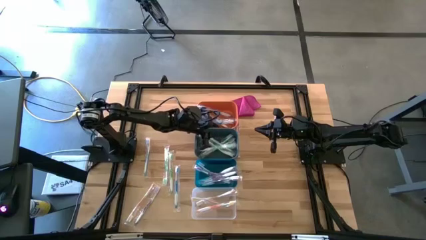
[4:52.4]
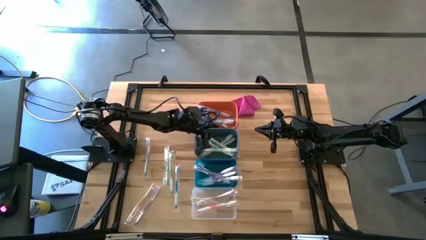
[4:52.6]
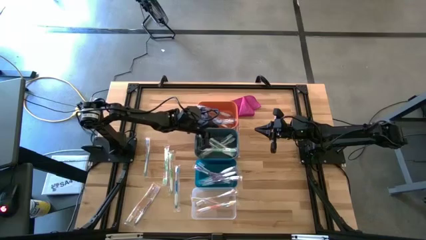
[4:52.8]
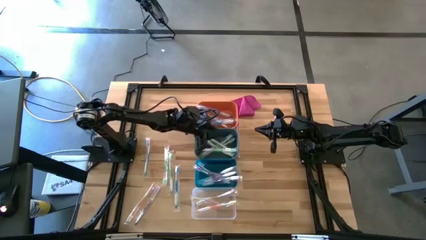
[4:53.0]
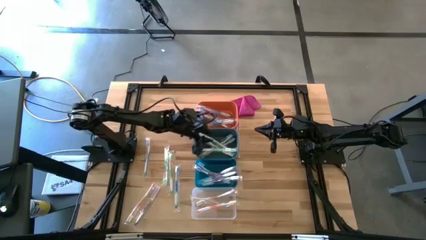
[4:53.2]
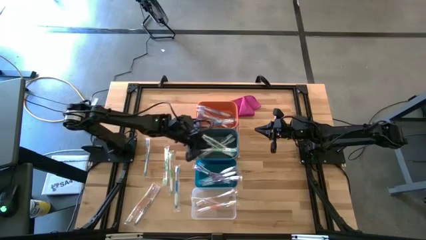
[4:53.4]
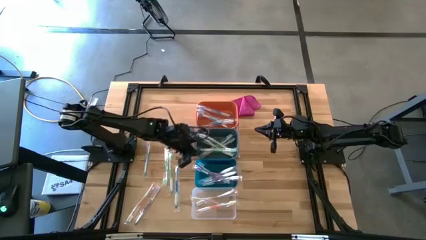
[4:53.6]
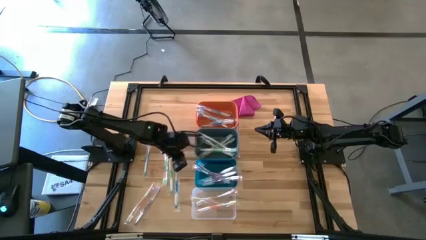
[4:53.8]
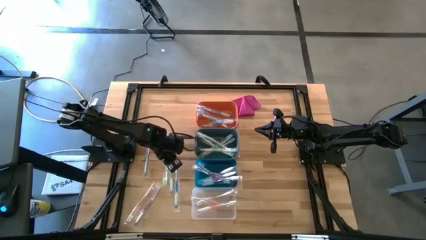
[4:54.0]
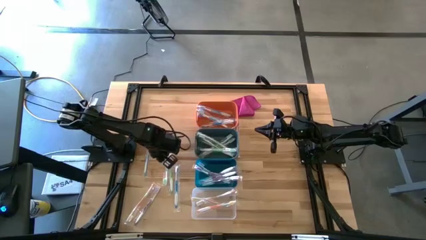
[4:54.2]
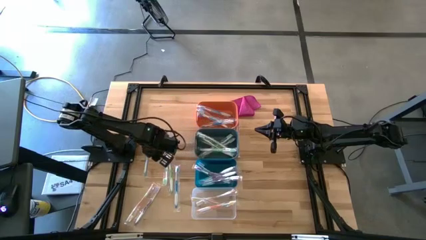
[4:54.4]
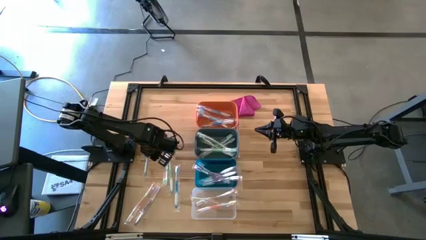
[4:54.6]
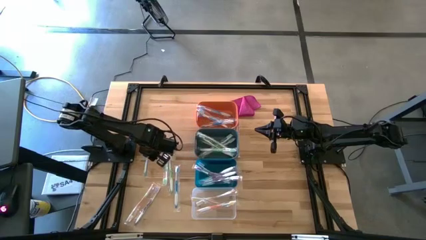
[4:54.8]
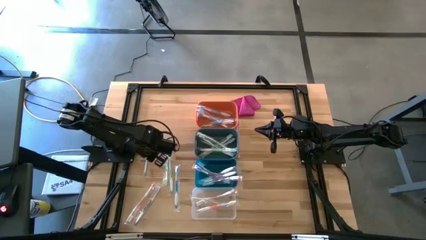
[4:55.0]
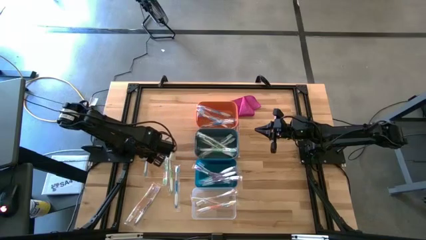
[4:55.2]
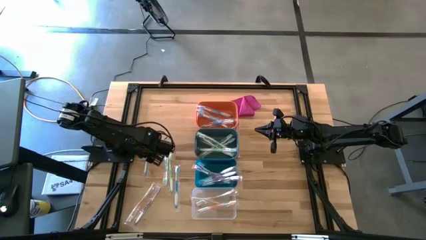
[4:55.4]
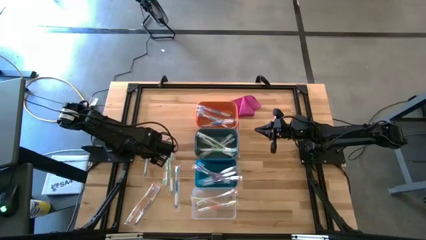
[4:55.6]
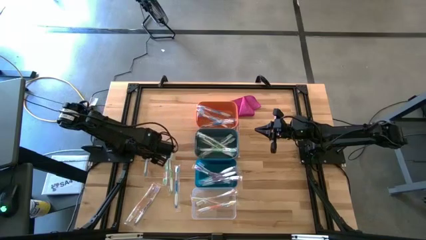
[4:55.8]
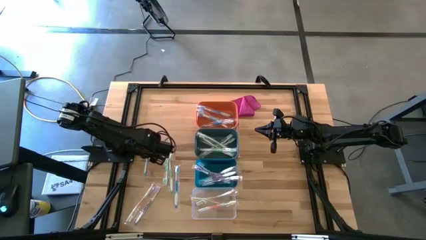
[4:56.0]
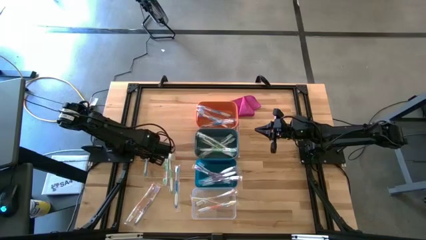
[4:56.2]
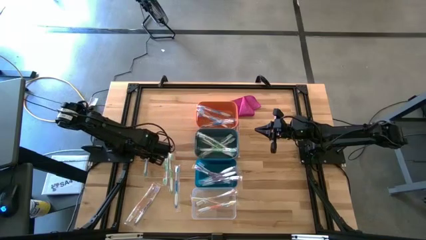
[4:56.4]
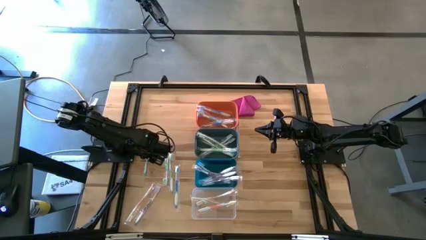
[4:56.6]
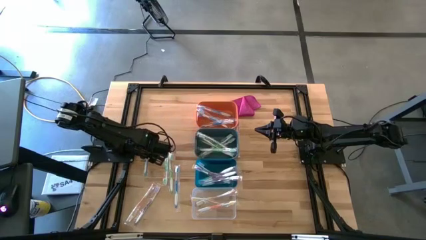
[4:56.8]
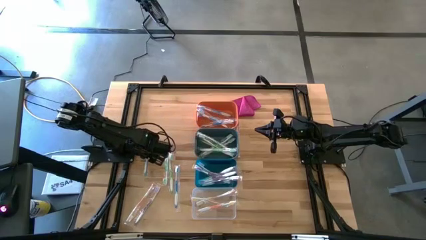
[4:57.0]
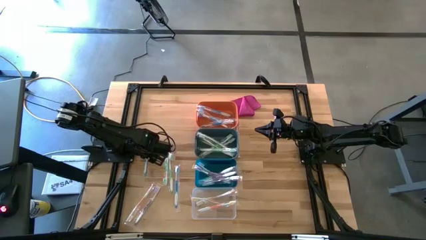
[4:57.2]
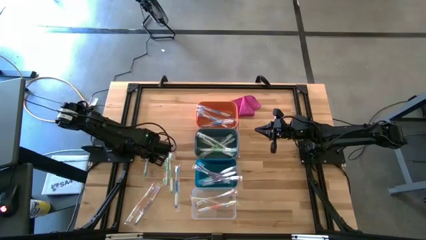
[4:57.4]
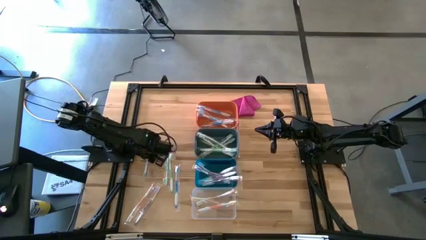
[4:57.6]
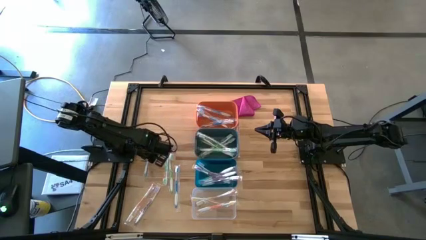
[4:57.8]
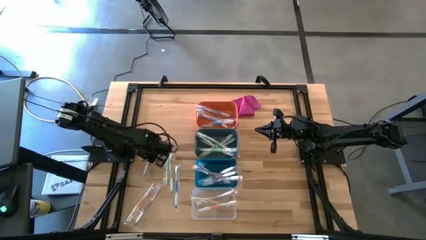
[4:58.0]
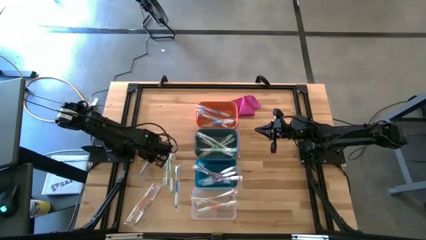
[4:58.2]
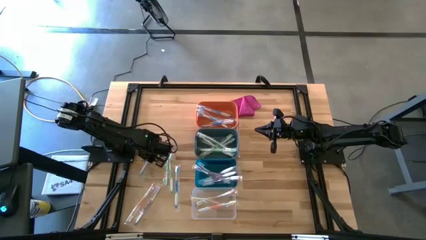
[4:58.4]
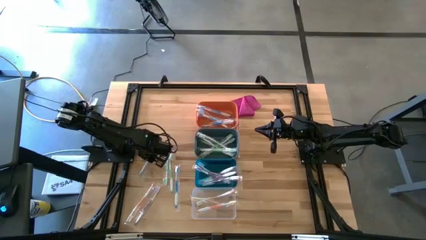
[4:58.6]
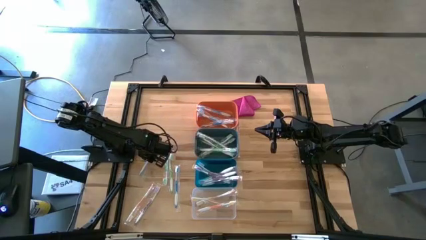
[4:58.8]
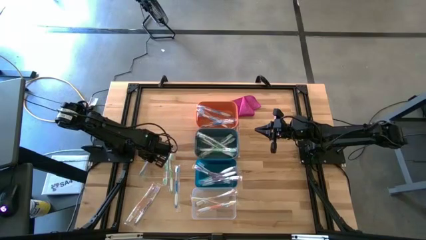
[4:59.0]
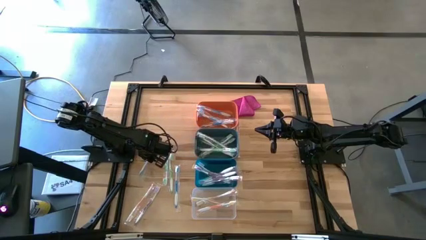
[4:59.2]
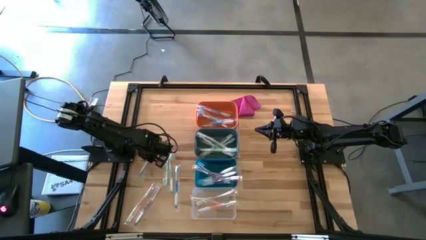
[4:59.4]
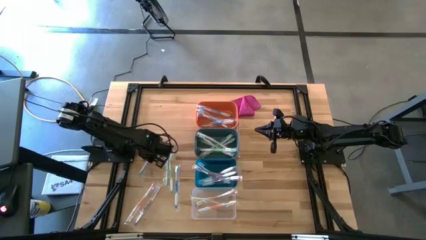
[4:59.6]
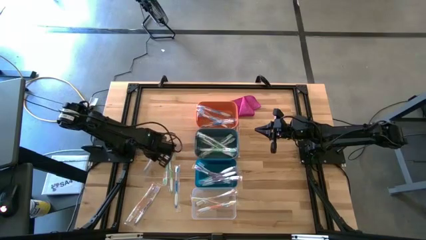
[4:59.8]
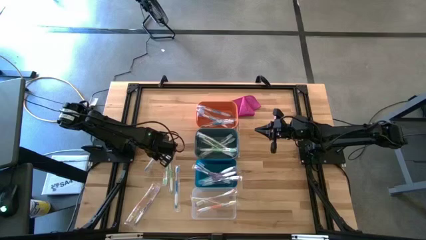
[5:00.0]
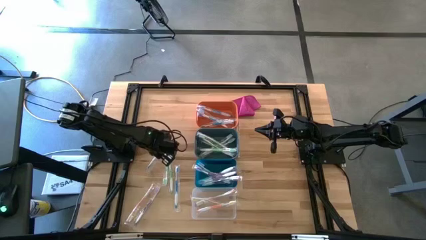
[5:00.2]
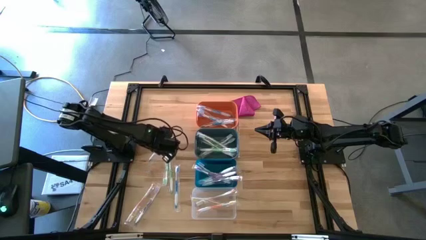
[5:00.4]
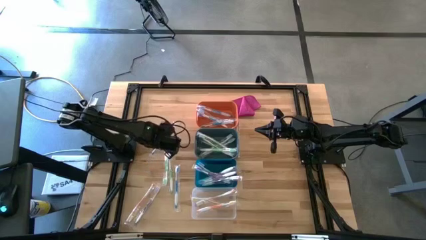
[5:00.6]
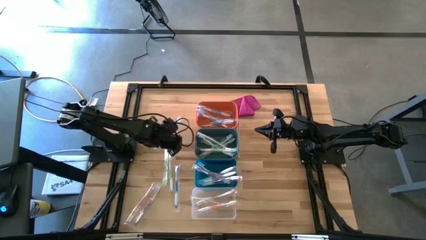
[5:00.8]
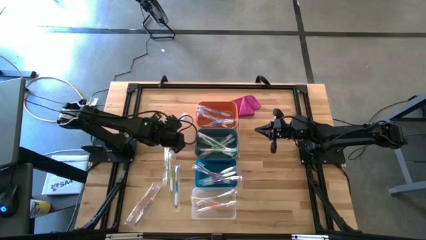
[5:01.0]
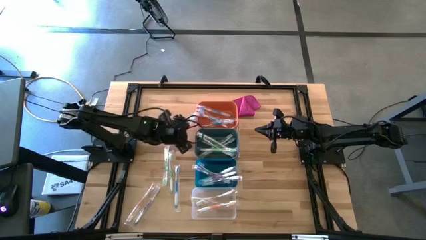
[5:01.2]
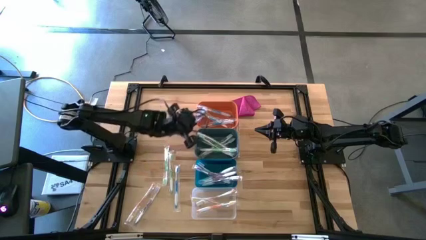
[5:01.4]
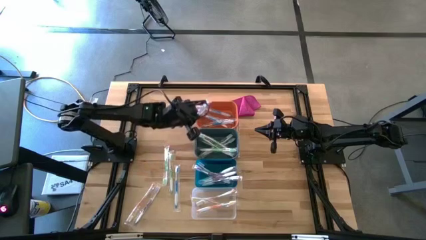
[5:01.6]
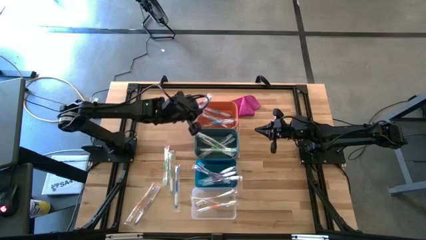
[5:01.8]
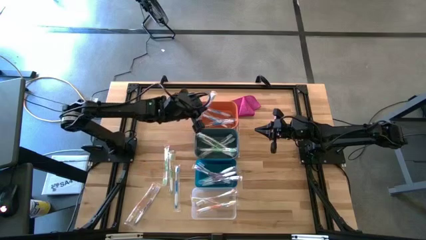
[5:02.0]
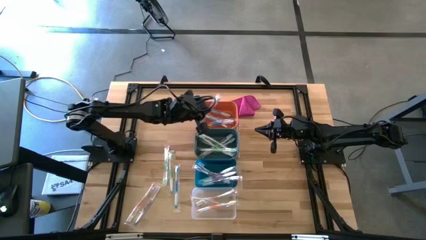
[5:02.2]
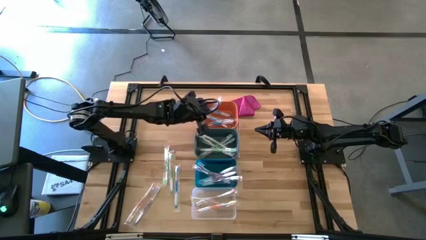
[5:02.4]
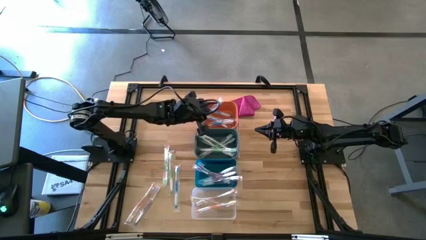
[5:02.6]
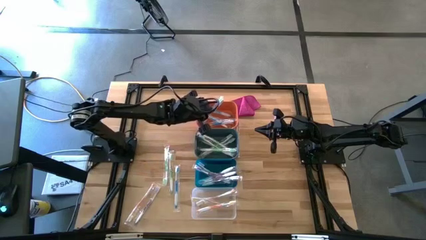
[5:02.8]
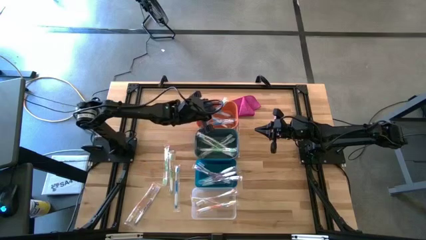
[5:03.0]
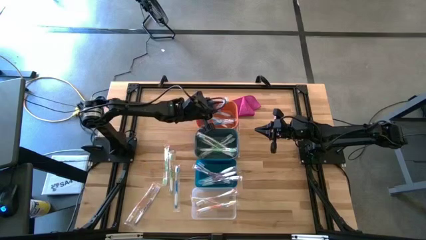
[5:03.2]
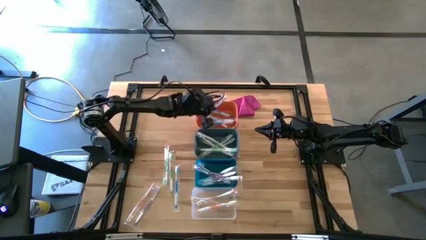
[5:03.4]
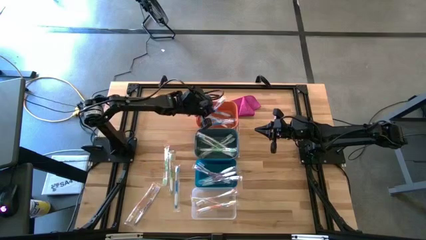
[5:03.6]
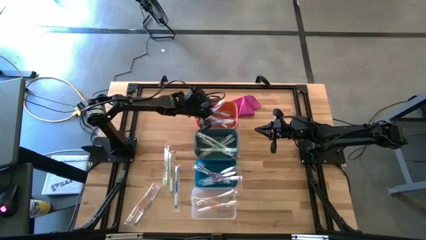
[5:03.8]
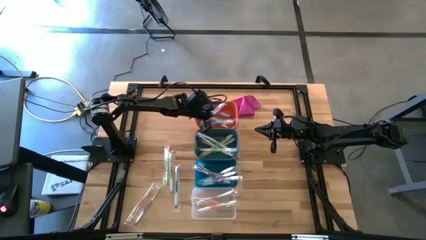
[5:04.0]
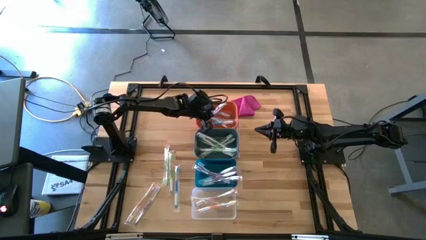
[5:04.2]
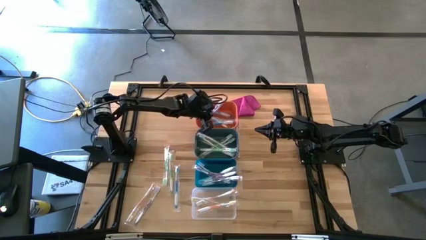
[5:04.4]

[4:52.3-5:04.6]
Task: Pick & Place Toothbrushes
Put the blue toothbrush into the orange bin

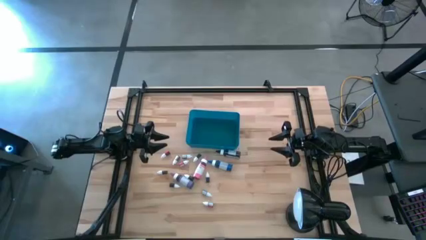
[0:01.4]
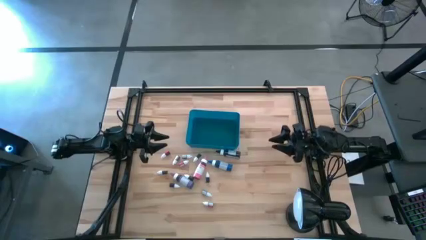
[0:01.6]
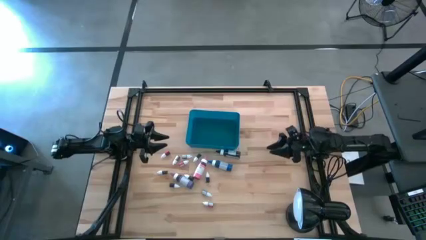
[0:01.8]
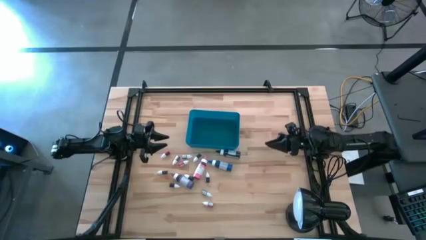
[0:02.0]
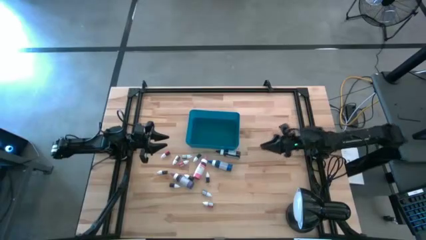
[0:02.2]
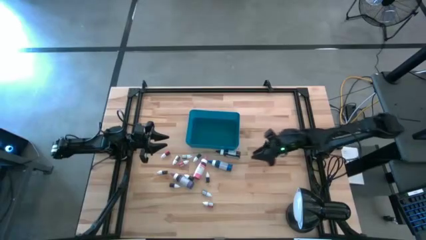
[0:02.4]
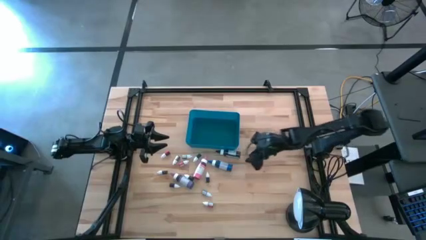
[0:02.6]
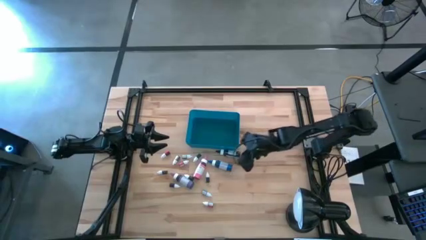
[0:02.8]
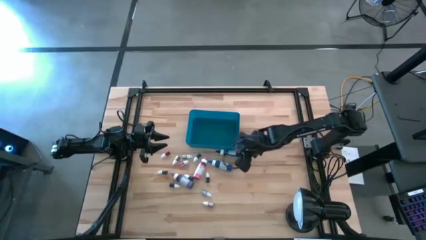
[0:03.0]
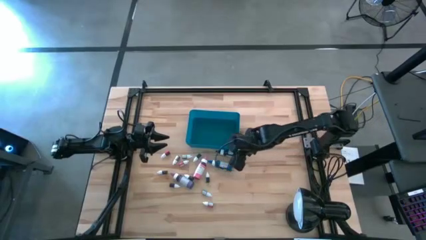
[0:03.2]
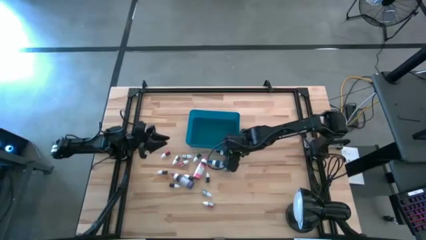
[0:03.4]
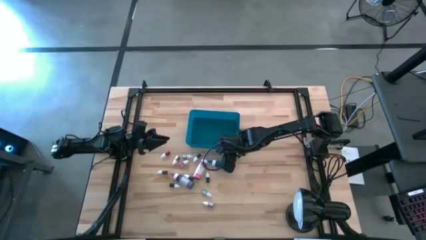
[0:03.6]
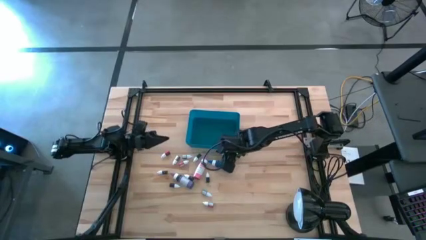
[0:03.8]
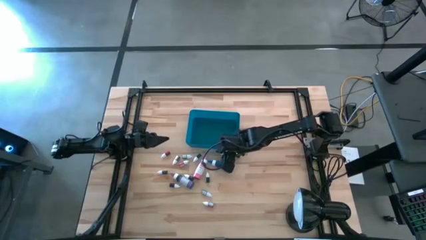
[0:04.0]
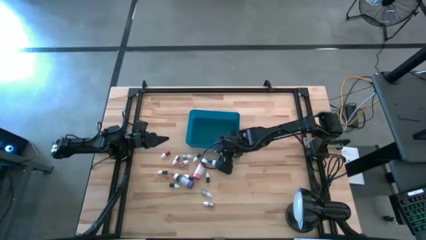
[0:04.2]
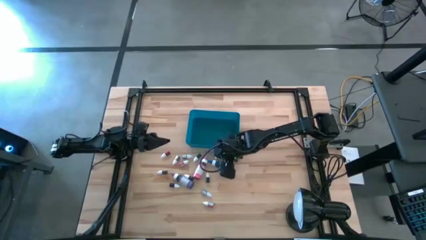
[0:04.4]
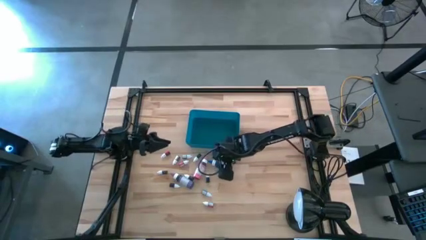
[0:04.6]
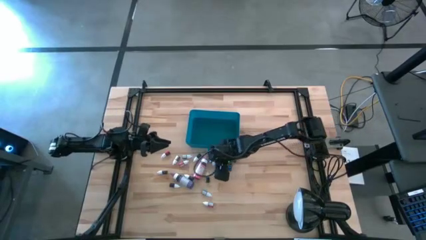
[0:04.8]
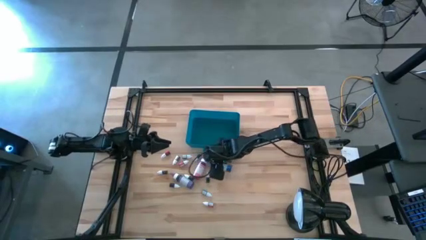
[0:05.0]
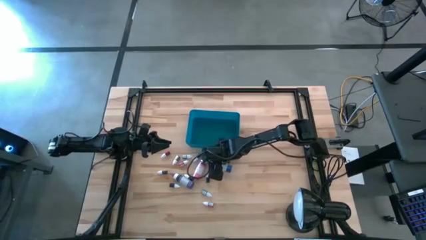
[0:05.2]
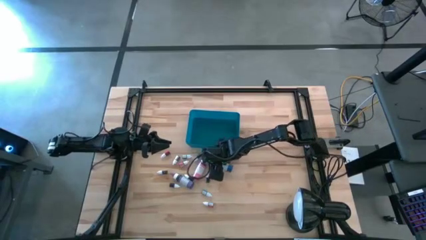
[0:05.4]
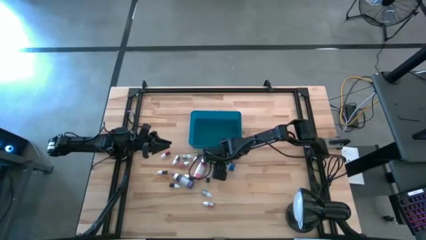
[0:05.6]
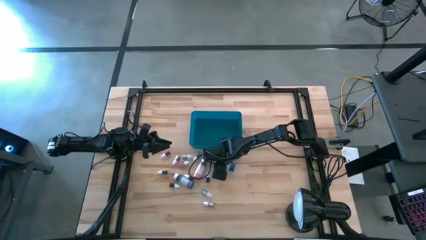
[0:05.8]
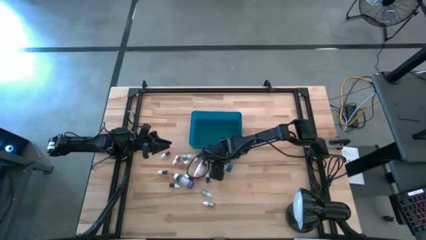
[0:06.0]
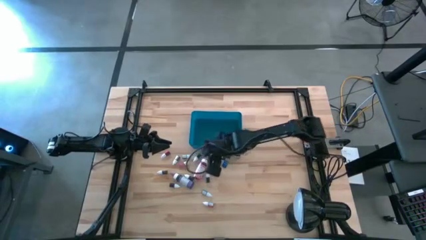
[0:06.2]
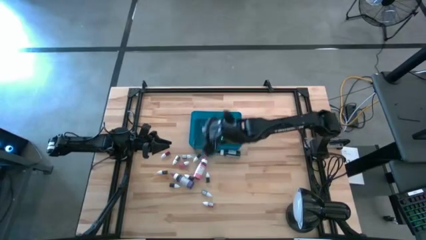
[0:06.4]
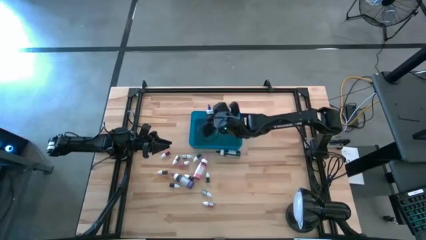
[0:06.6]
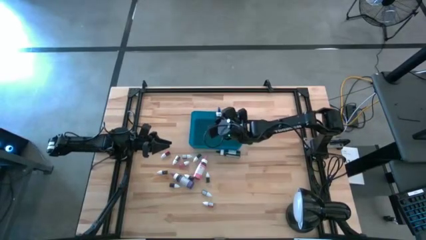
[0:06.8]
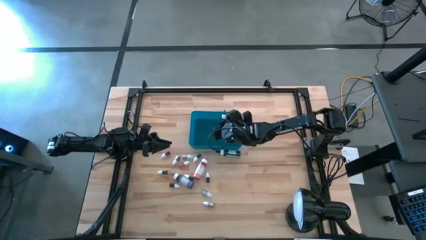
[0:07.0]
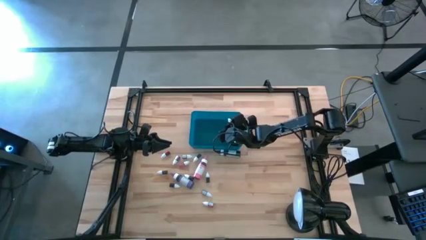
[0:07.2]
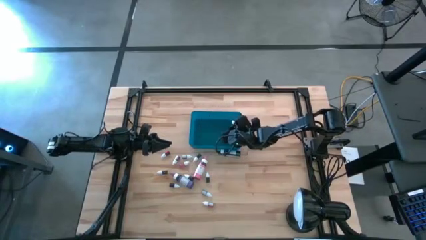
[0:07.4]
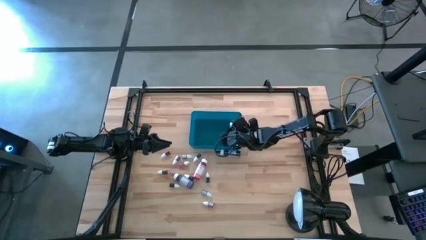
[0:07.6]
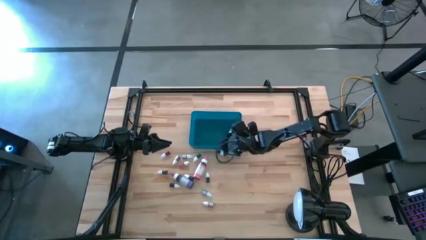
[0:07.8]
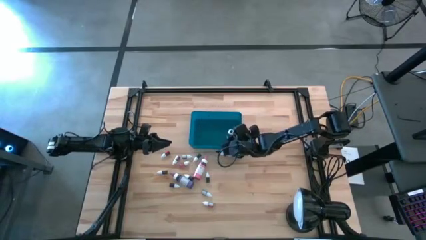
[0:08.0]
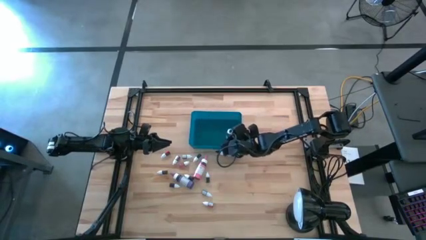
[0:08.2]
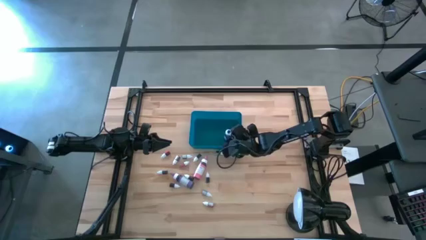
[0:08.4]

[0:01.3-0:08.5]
Task: Pick & Place food coloring
Put the large blue food coloring bottle into the bin
